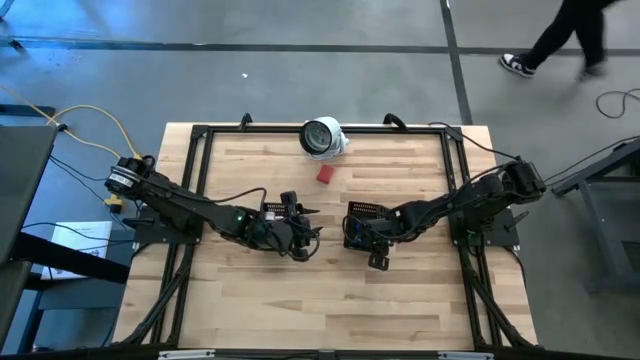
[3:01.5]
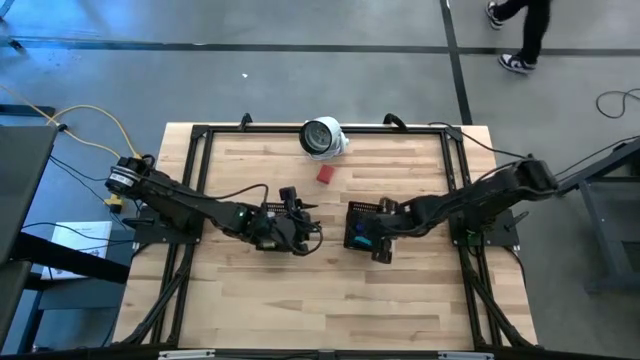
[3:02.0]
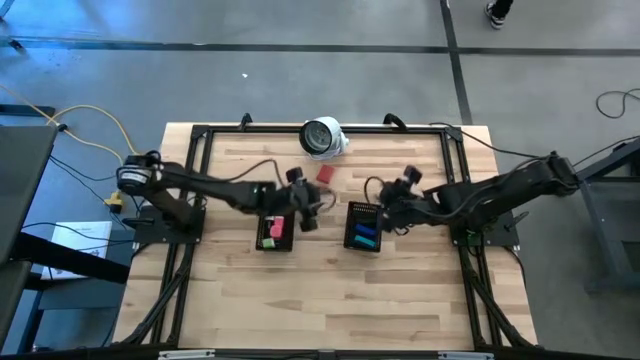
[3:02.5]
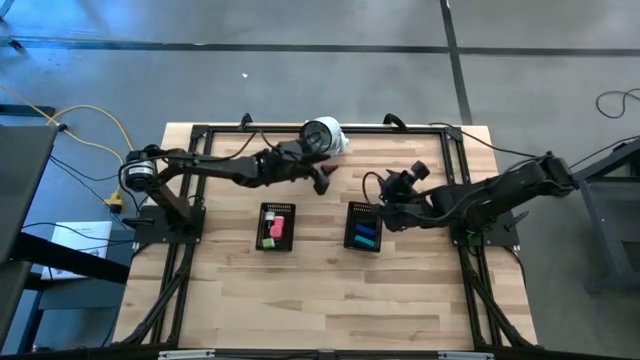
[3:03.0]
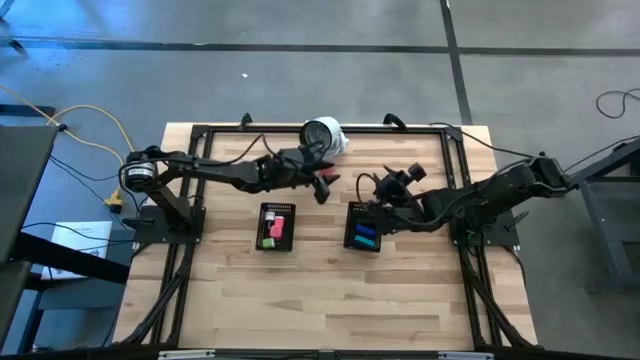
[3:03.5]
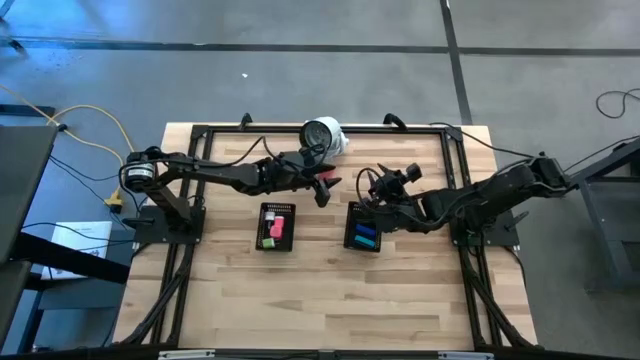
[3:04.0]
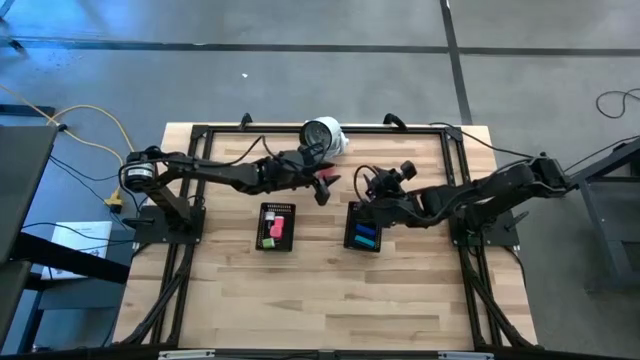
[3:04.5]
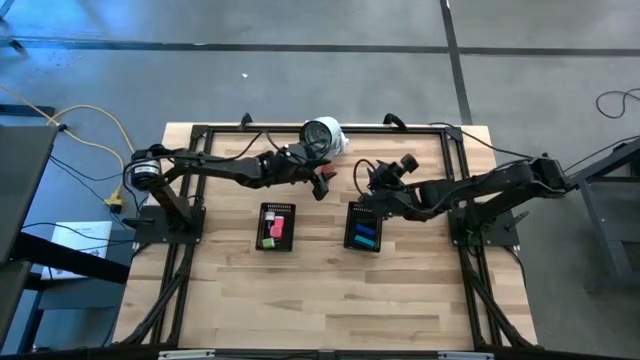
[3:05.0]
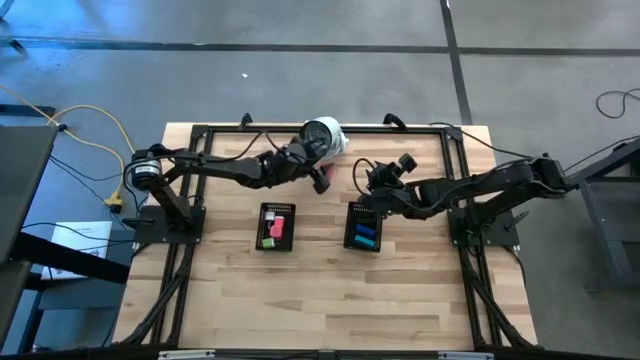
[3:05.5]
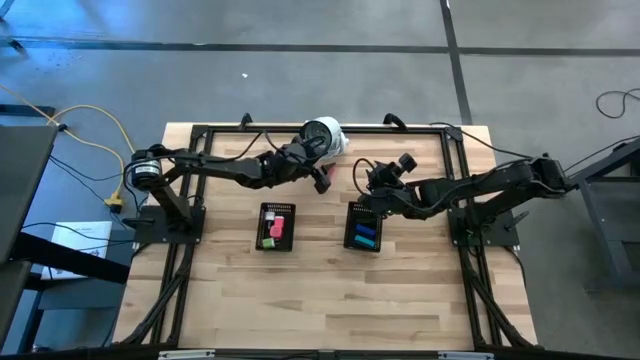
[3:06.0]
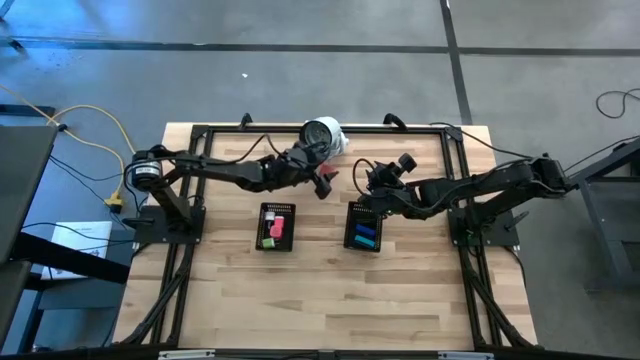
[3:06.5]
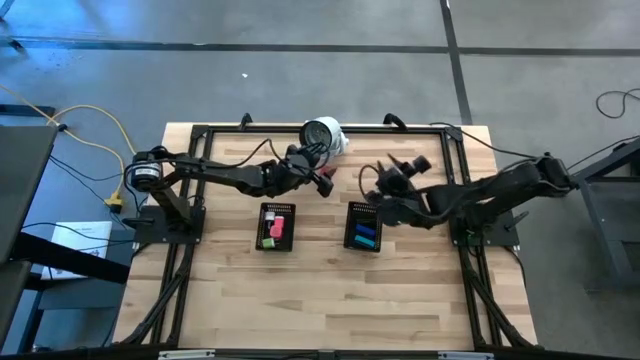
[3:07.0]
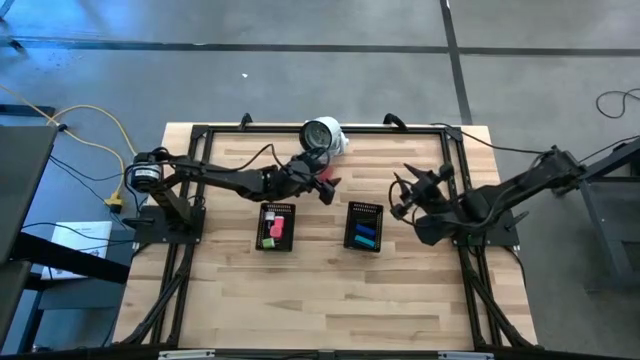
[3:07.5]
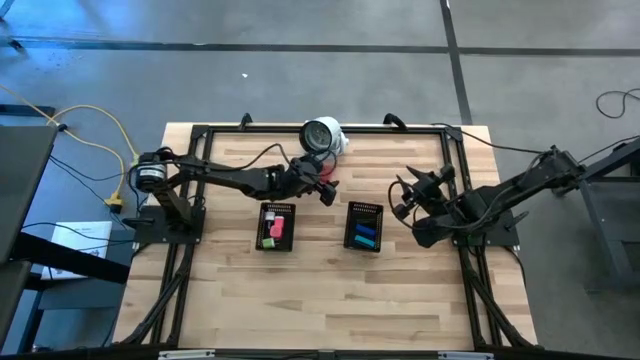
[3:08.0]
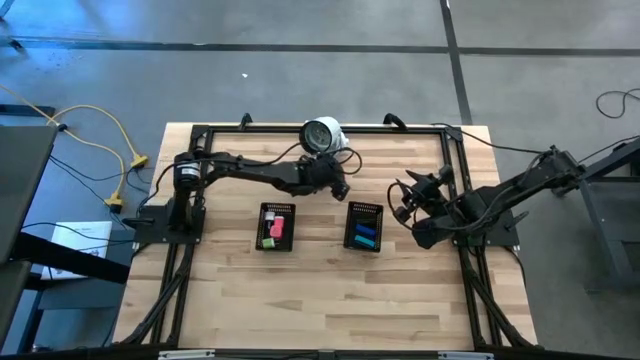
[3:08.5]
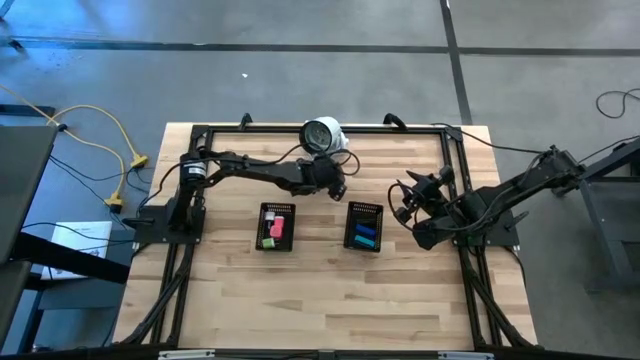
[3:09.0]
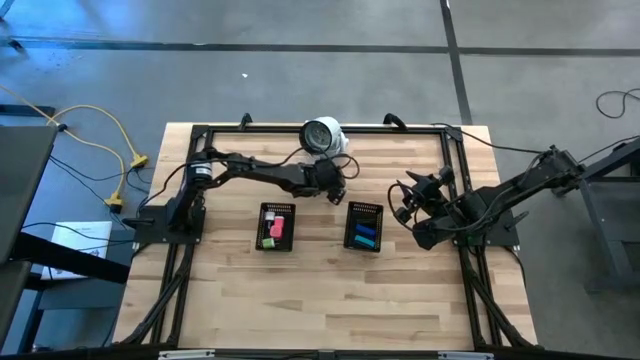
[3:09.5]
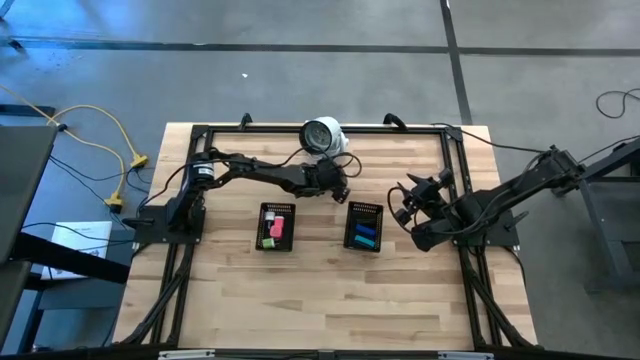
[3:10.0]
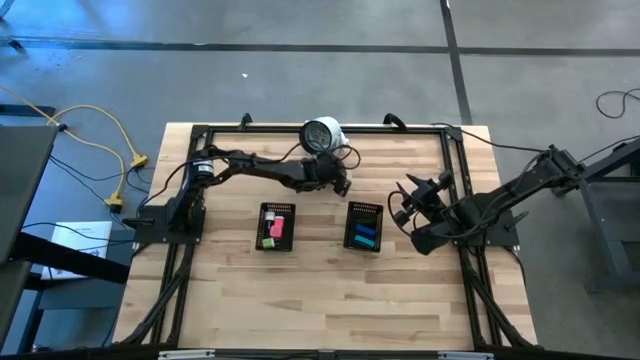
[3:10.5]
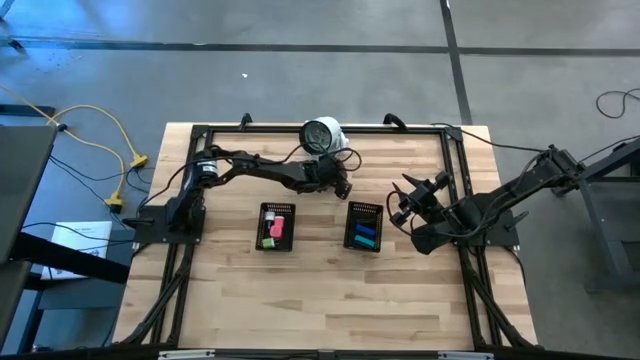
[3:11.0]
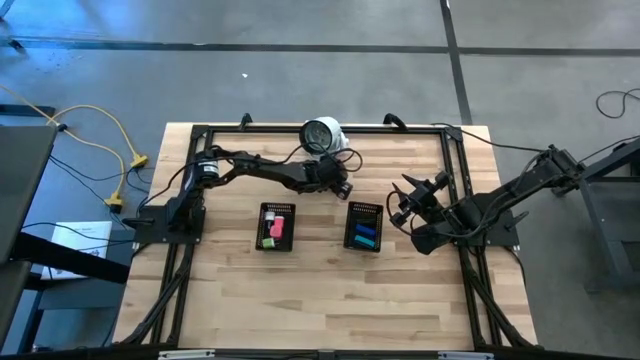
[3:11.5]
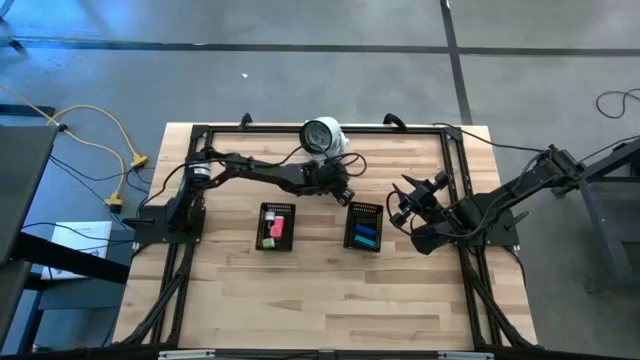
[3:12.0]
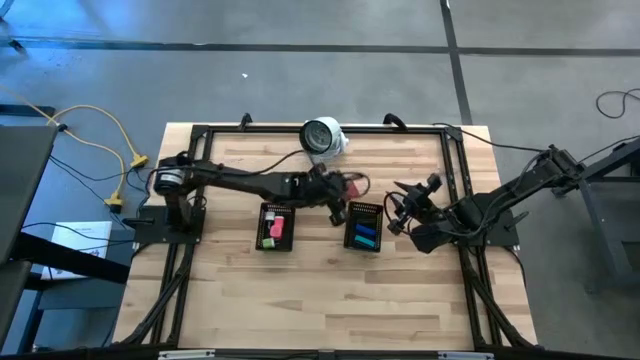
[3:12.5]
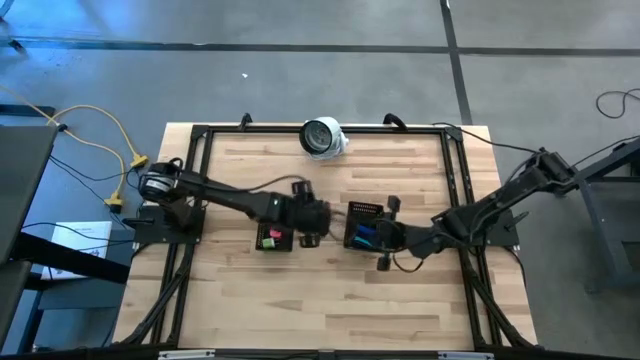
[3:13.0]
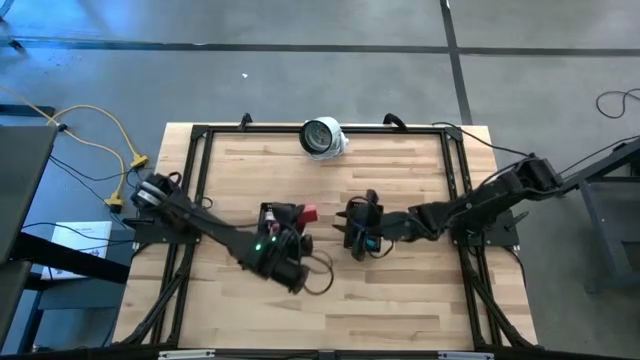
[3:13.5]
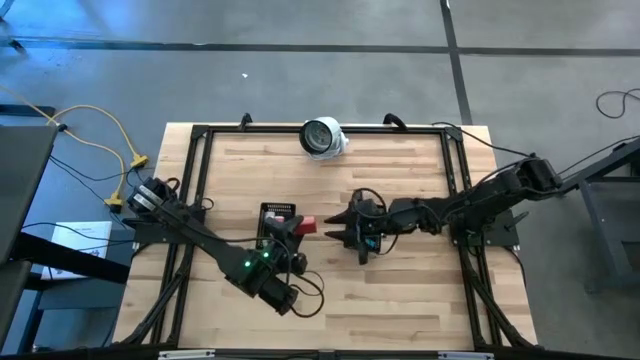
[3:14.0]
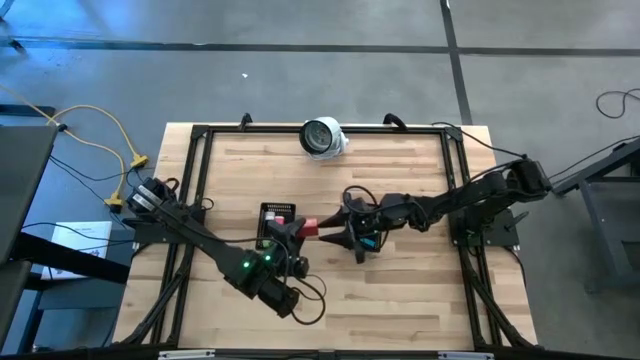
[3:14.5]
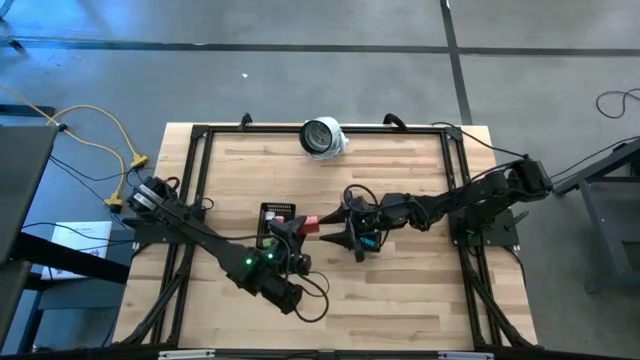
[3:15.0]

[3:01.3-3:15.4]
Task: Pick & Place Office items
Put the red charger adapter into the left black bin

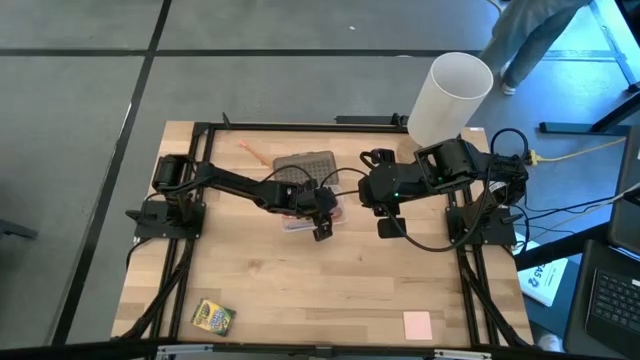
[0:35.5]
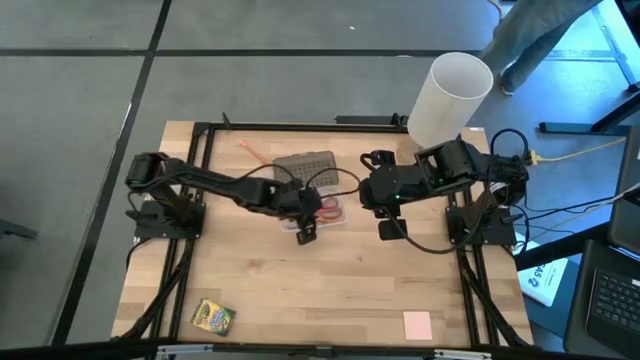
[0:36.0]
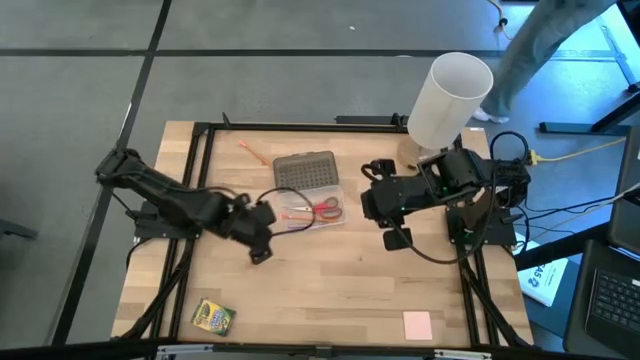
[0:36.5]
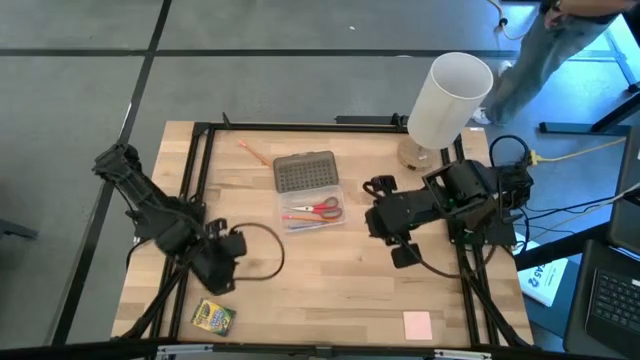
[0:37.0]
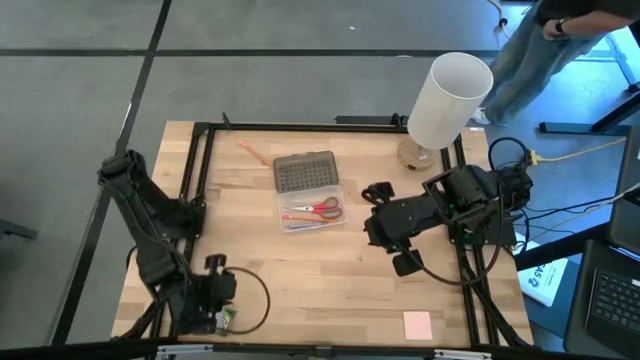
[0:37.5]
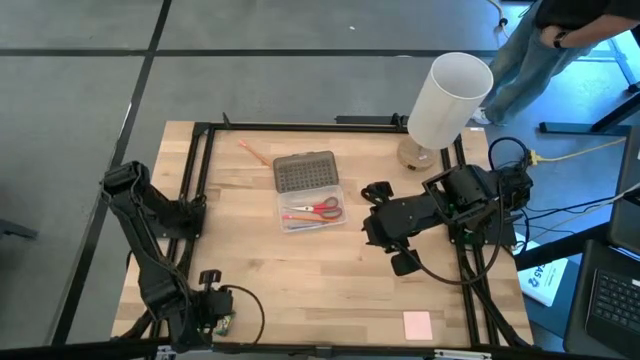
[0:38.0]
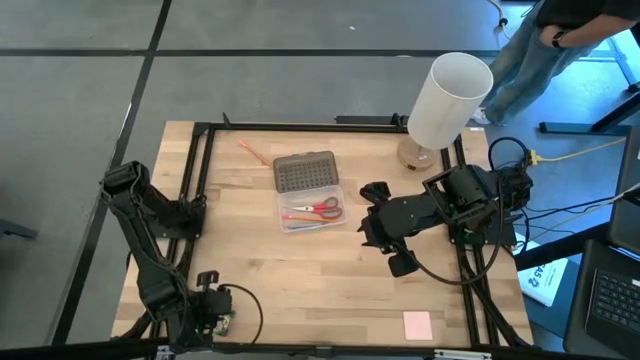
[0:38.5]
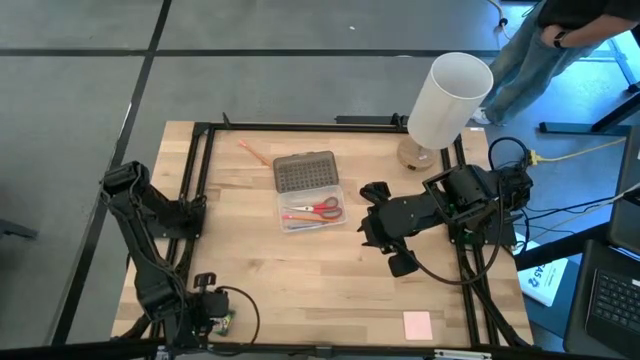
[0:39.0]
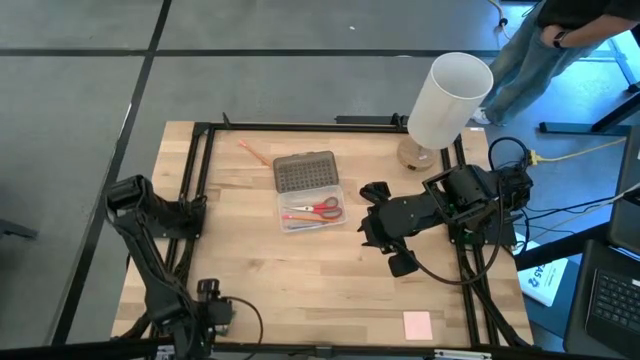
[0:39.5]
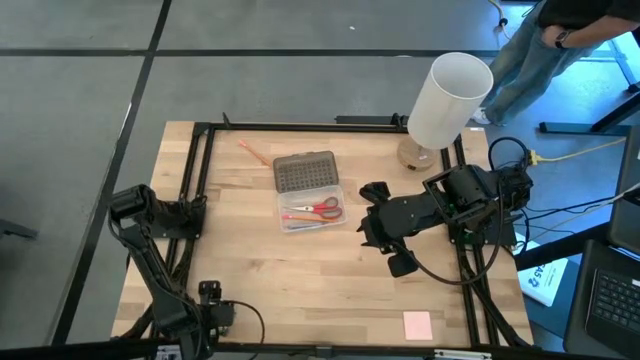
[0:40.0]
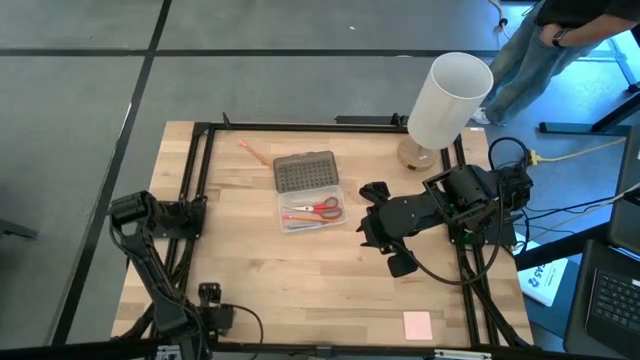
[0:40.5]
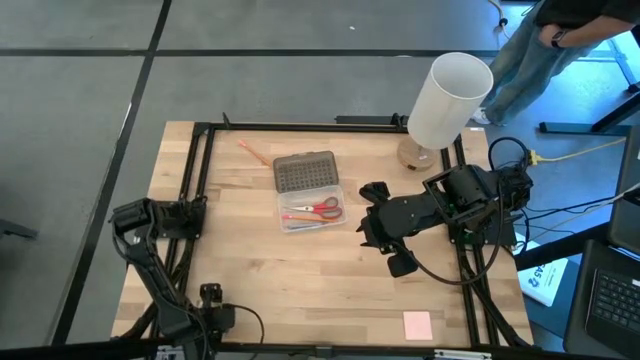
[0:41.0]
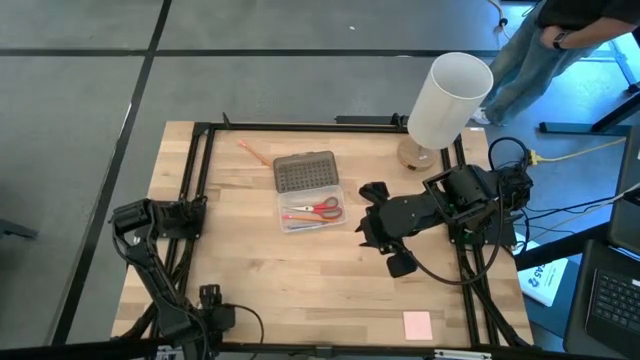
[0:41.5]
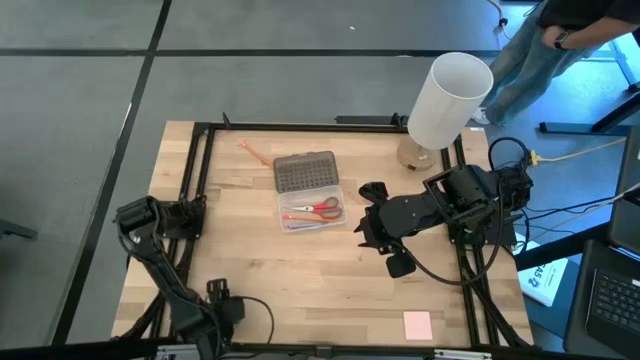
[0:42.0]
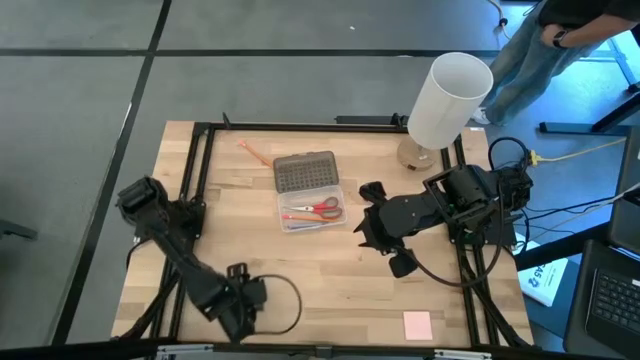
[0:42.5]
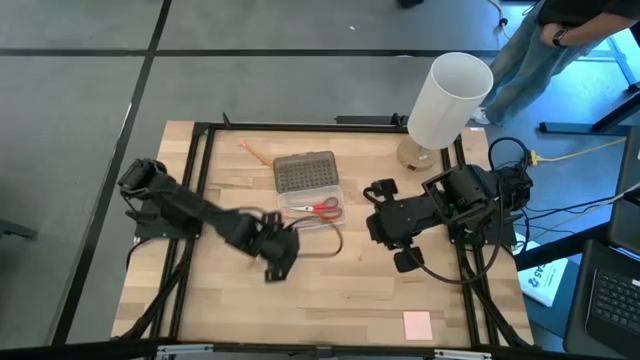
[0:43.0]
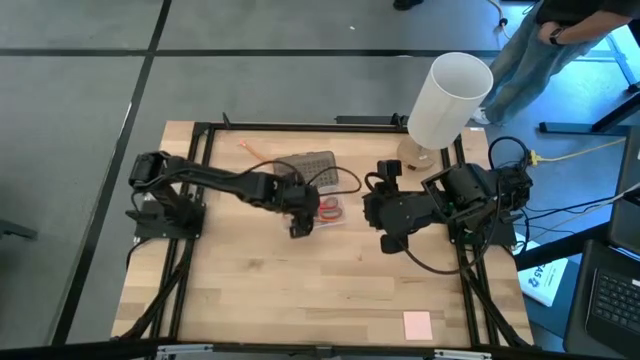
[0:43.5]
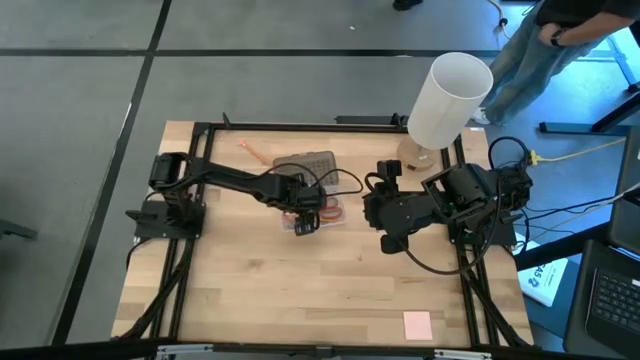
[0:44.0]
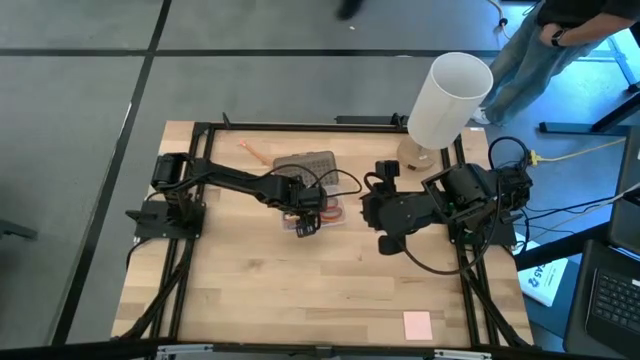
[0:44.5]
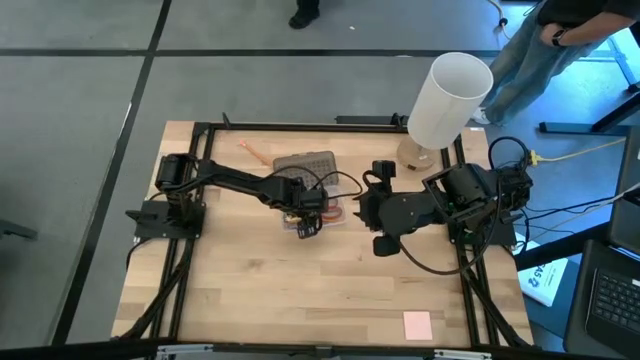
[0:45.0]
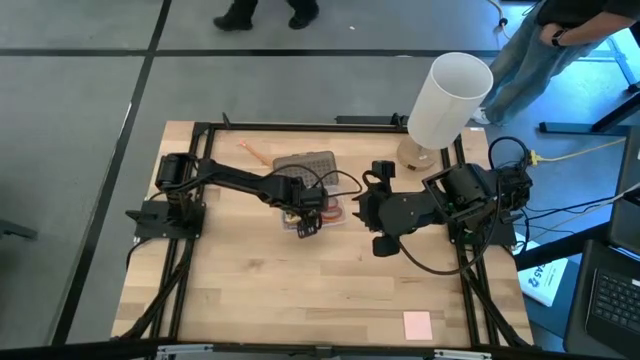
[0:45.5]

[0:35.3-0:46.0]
Task: Pack school essentials
Put the yellow crayon box into the black supply box
